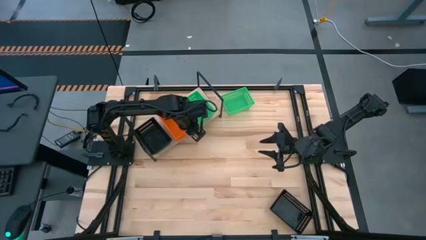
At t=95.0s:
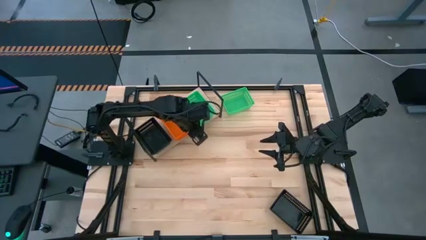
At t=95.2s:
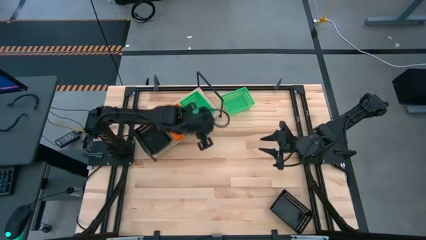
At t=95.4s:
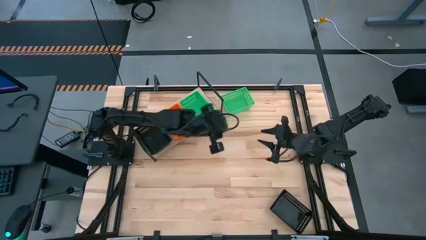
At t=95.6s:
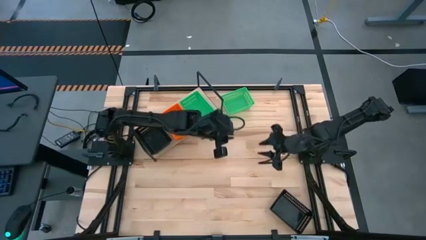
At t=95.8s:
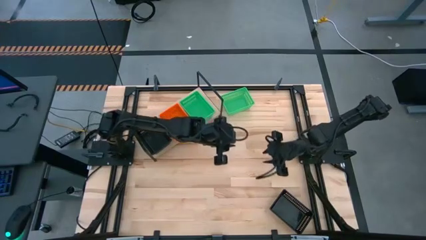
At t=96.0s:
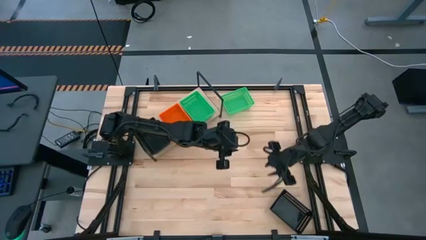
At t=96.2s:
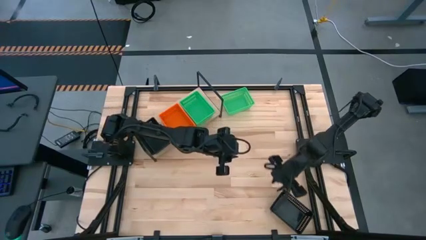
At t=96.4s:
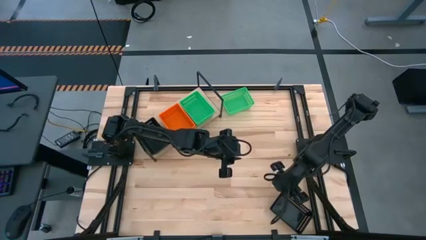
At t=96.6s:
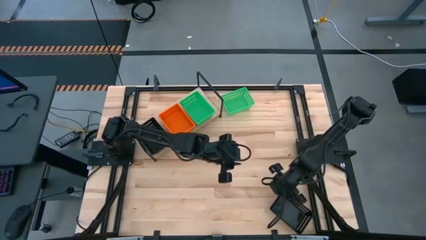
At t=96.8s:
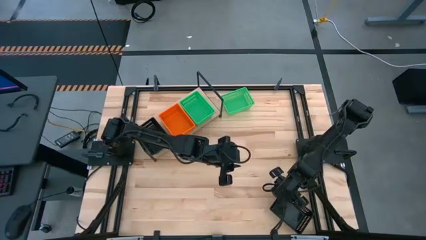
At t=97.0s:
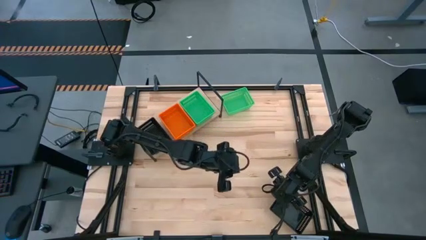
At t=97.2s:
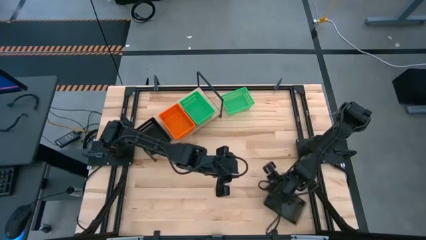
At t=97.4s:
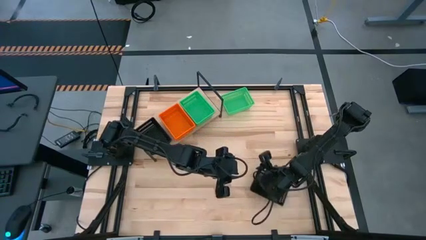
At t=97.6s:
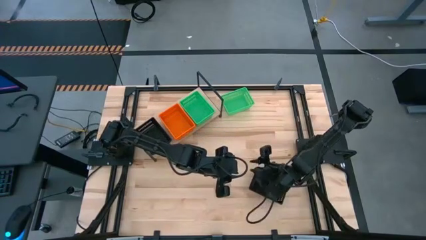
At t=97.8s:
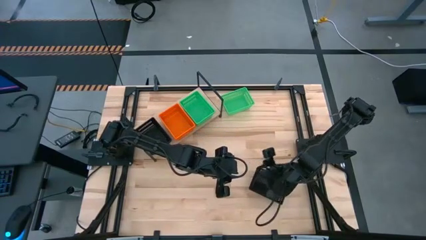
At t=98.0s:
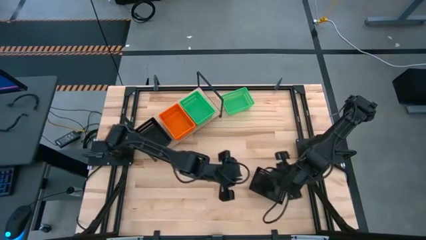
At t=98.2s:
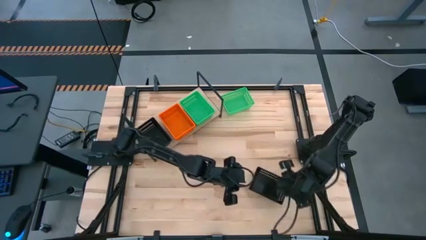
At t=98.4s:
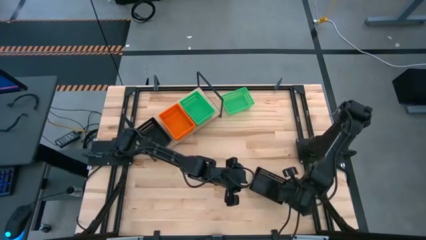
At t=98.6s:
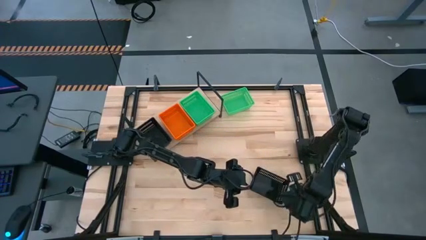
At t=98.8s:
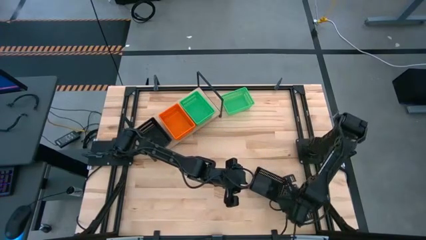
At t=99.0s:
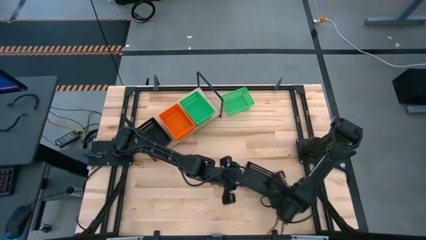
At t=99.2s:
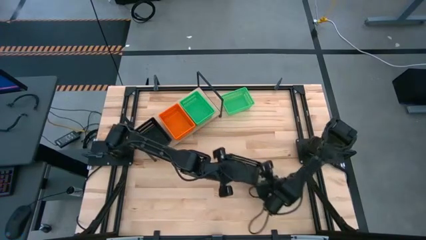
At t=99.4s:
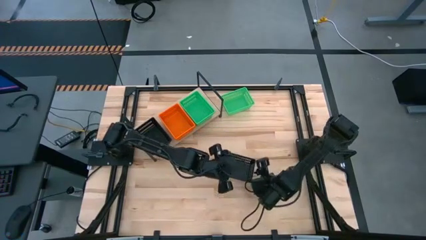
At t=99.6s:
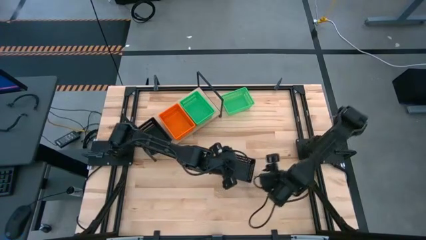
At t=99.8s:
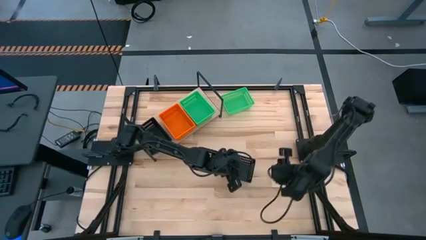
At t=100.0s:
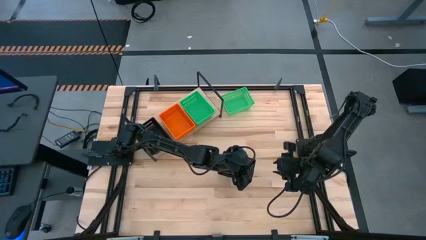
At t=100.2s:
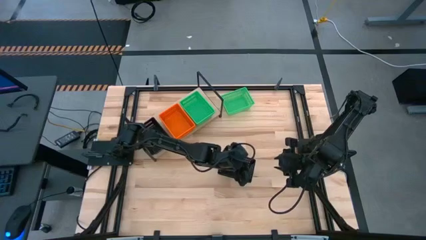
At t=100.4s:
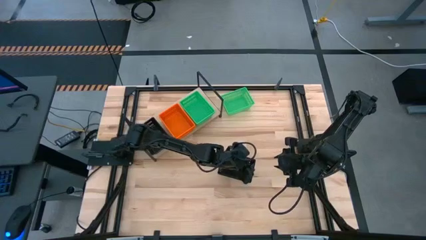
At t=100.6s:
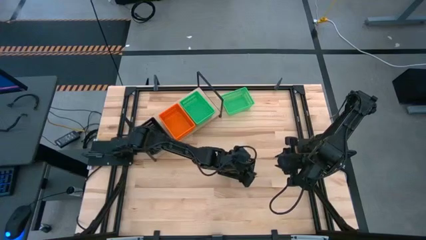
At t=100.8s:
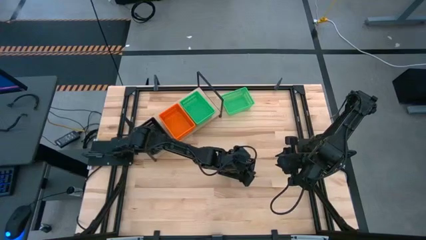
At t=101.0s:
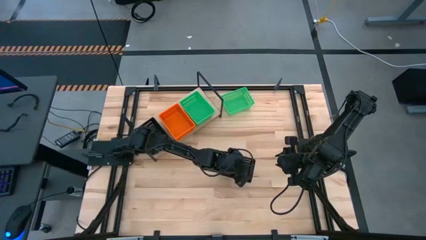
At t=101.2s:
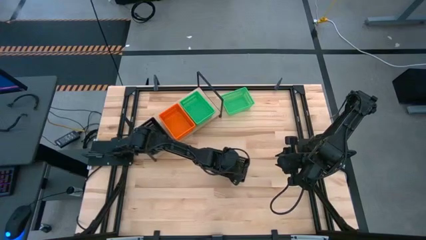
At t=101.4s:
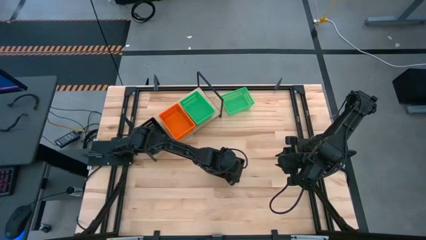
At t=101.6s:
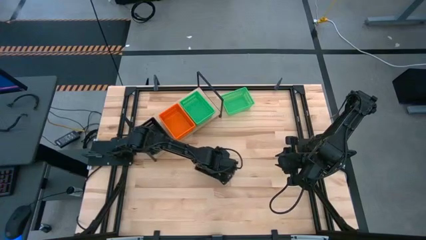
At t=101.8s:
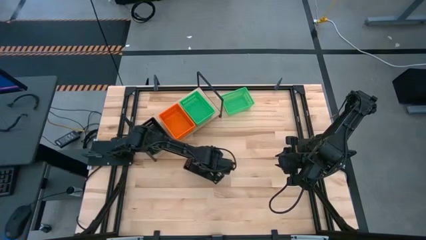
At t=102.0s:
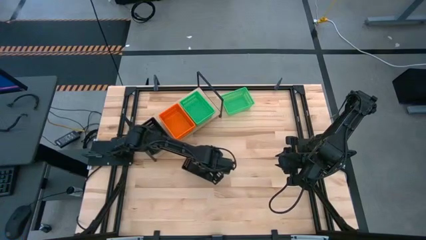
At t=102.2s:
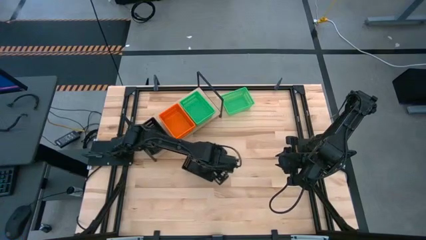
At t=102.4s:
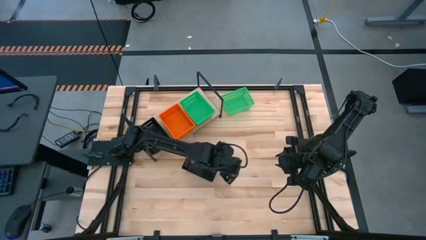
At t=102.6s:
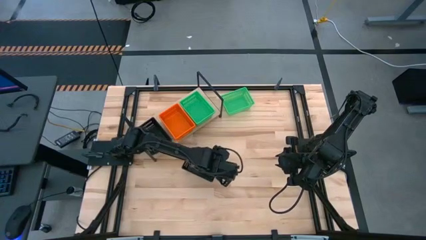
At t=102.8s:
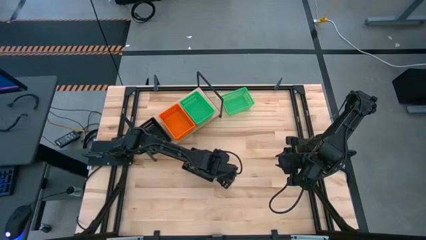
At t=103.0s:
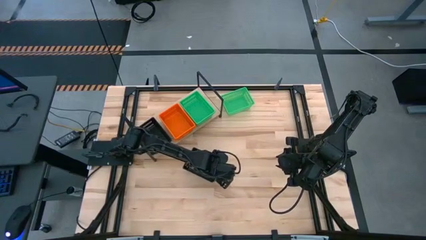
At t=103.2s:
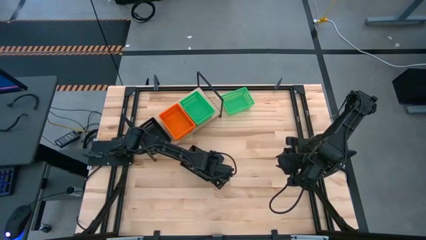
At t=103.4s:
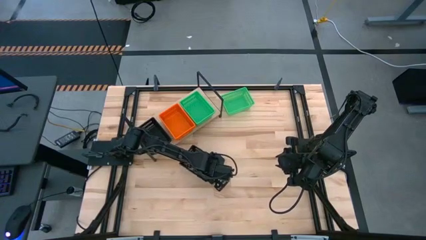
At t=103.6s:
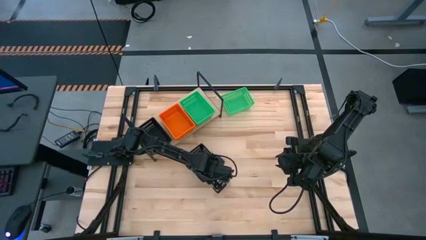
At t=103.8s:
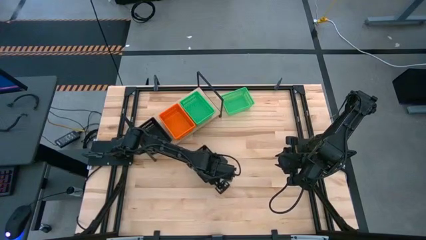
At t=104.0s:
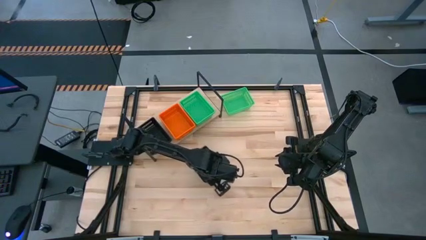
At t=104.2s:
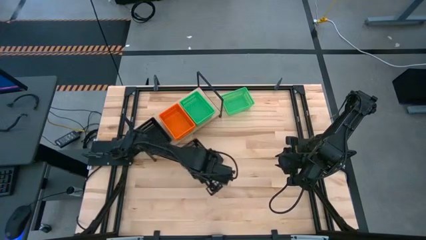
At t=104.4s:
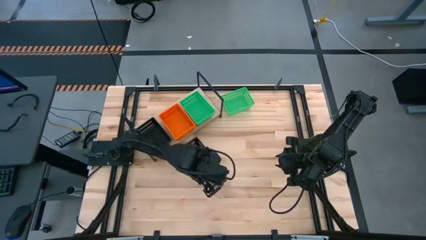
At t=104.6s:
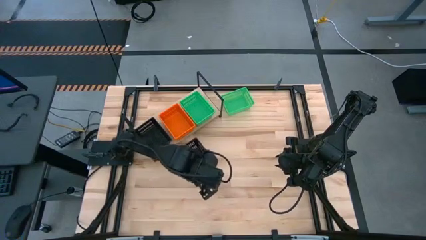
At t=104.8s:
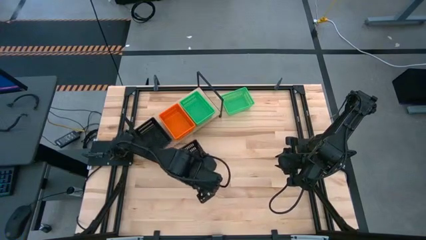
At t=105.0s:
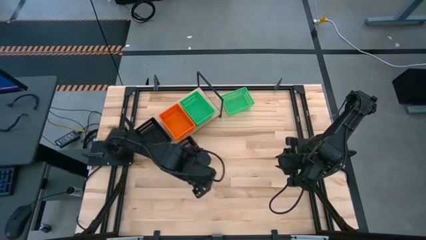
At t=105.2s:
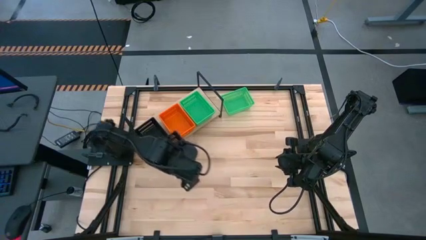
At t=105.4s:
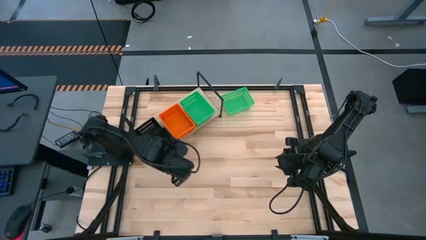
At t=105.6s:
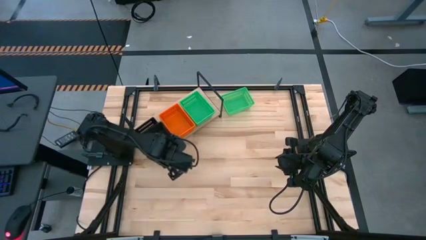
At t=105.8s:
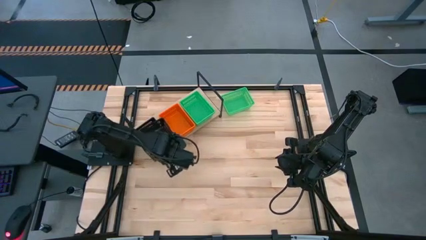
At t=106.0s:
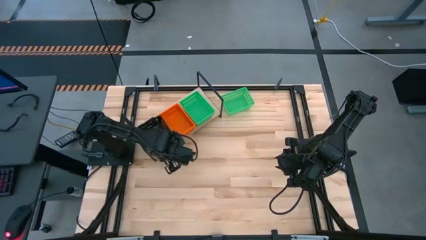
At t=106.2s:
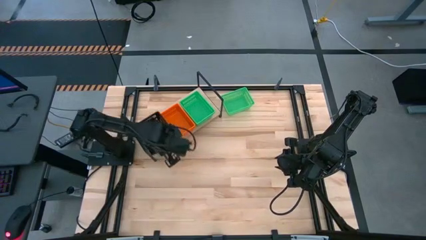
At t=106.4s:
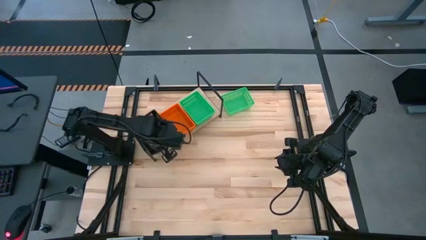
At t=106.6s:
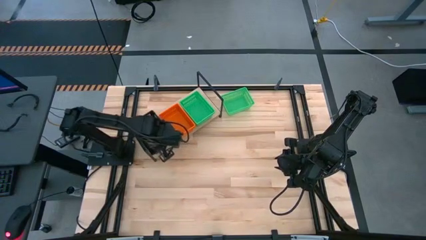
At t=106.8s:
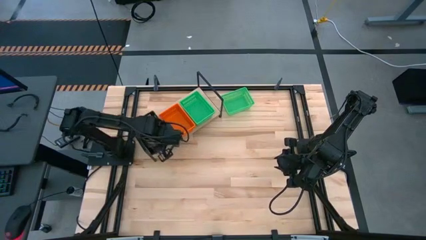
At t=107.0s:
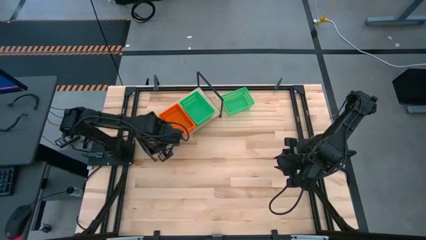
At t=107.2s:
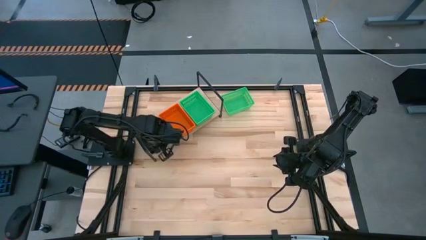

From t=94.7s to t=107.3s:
Task: Stack baskets on shelf by color
Stack the black bin on top of the black bin on the shelf
